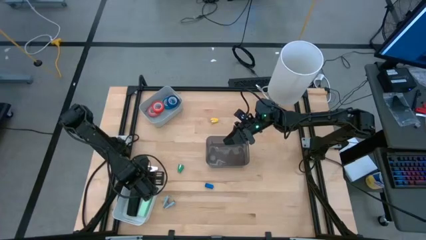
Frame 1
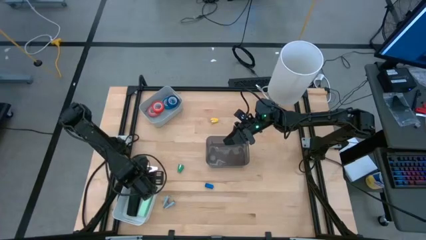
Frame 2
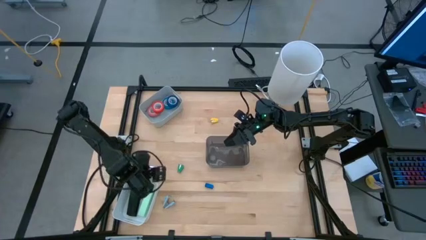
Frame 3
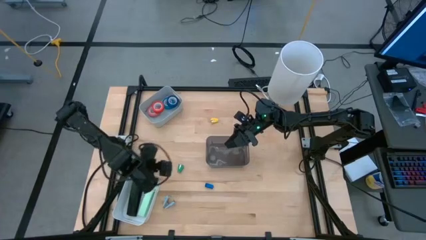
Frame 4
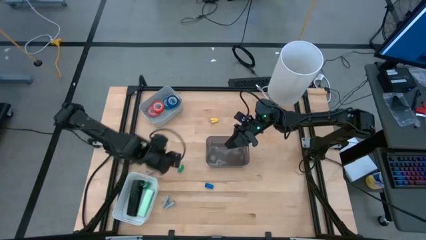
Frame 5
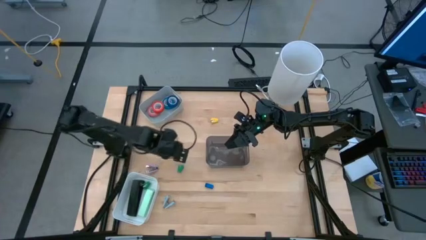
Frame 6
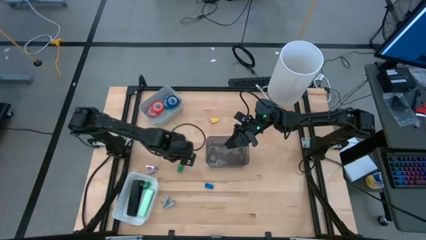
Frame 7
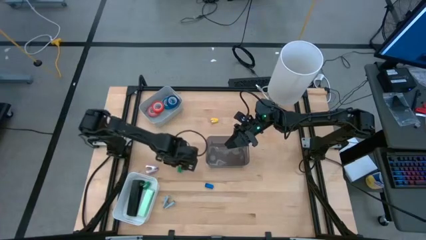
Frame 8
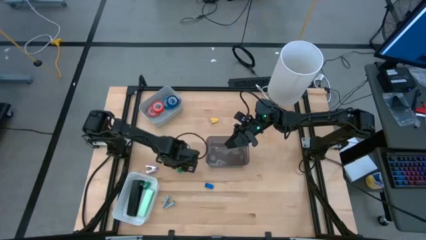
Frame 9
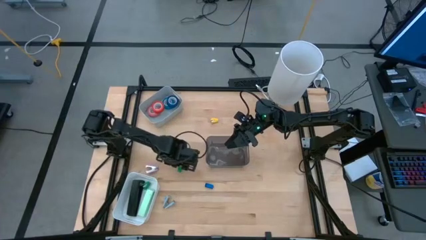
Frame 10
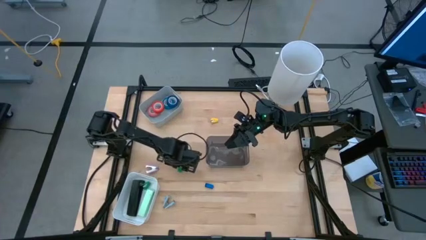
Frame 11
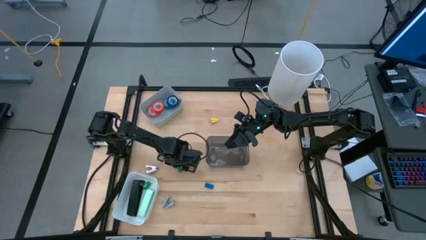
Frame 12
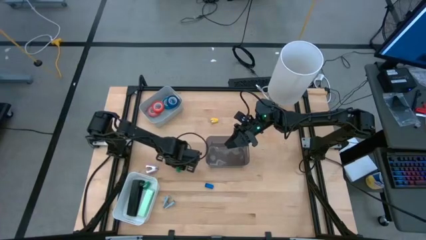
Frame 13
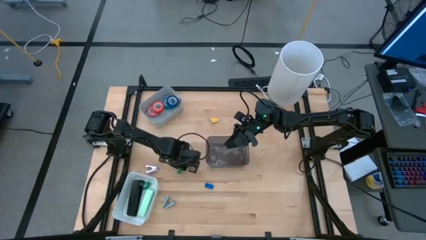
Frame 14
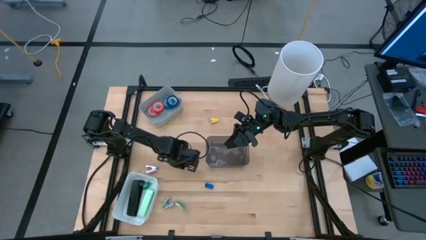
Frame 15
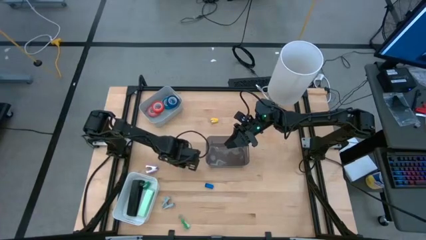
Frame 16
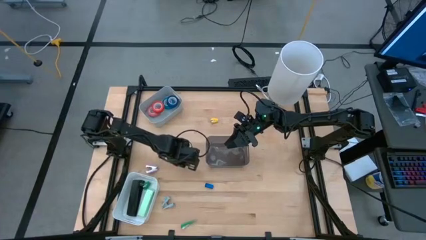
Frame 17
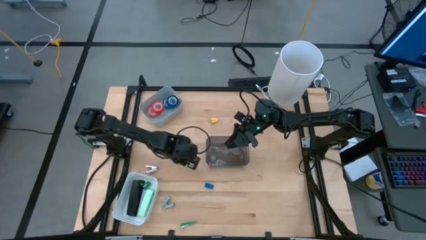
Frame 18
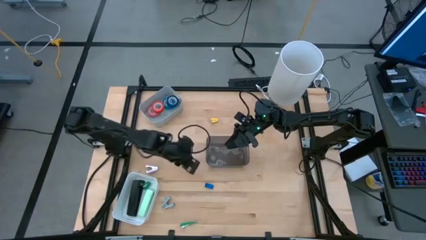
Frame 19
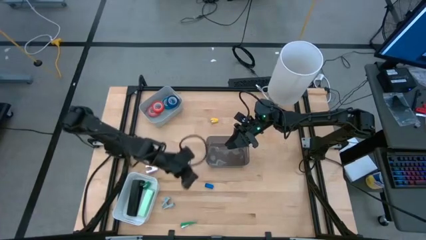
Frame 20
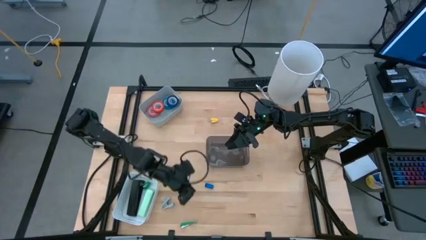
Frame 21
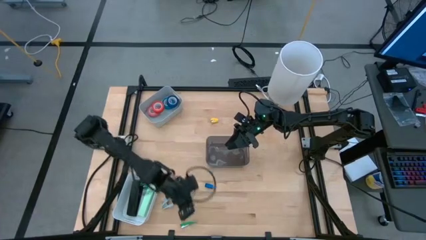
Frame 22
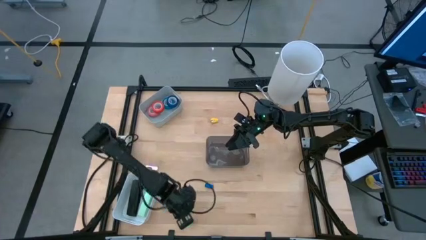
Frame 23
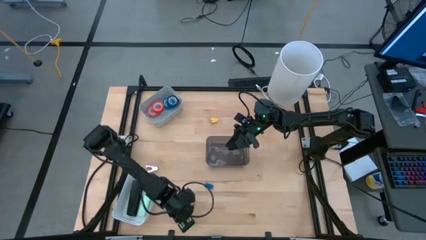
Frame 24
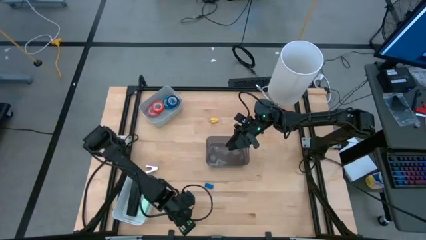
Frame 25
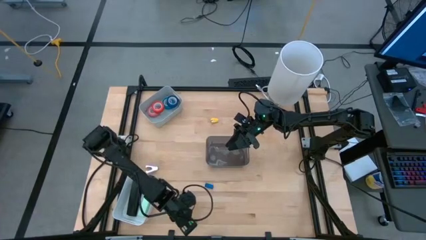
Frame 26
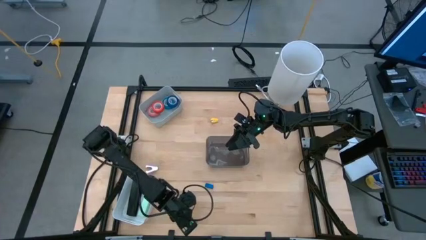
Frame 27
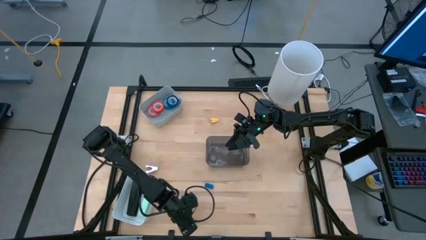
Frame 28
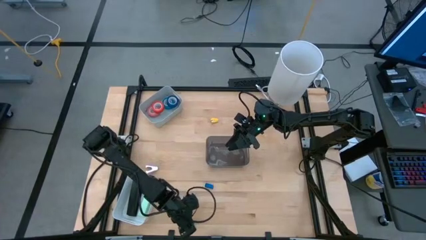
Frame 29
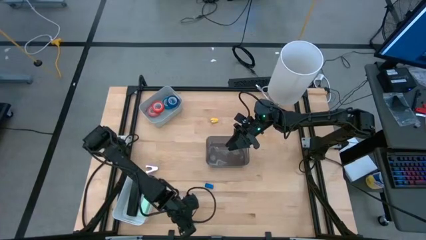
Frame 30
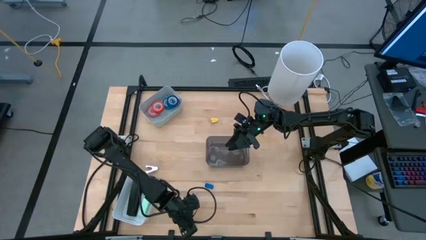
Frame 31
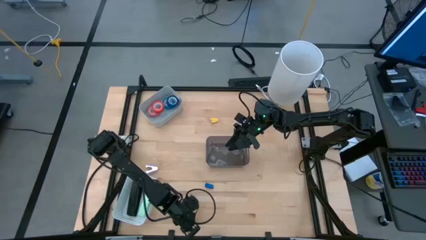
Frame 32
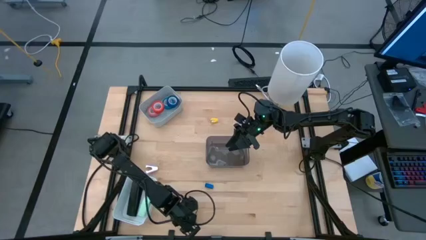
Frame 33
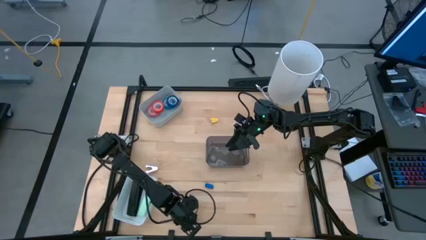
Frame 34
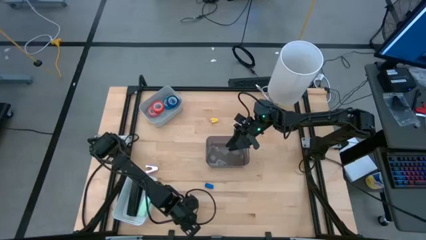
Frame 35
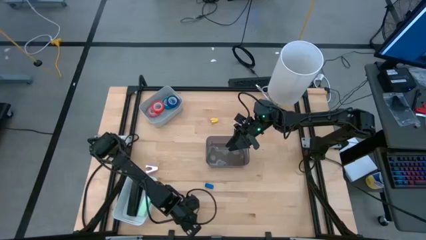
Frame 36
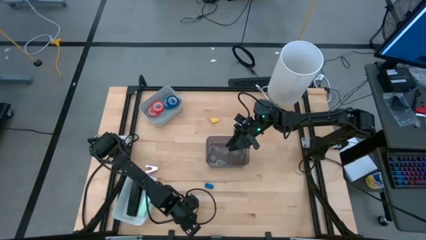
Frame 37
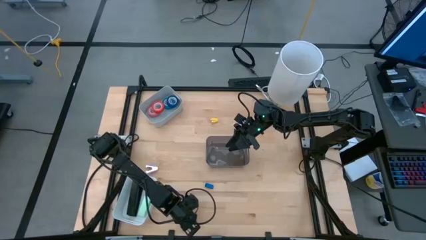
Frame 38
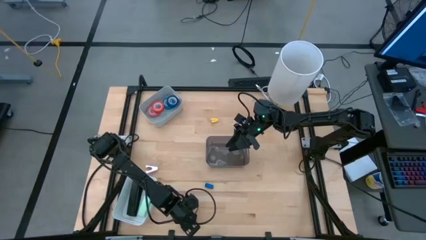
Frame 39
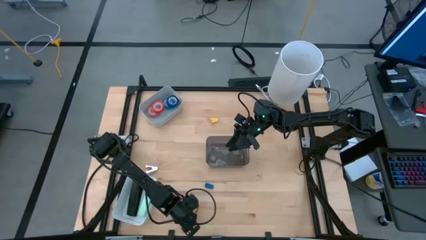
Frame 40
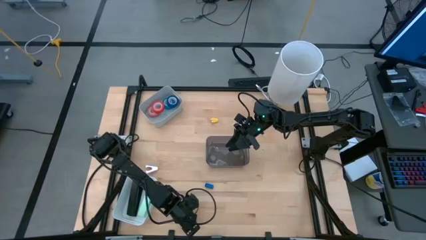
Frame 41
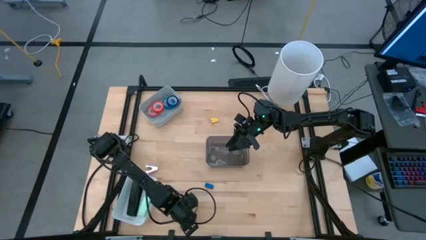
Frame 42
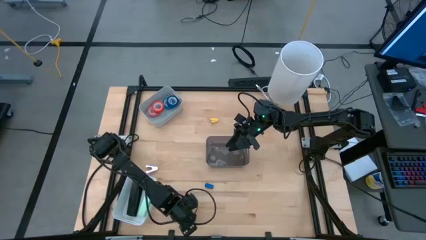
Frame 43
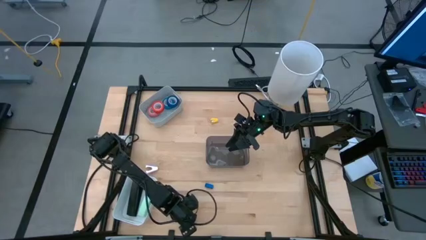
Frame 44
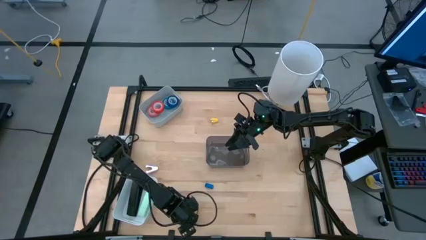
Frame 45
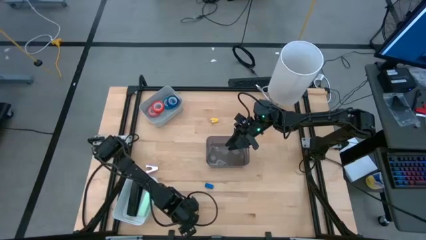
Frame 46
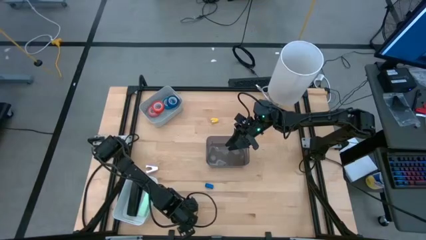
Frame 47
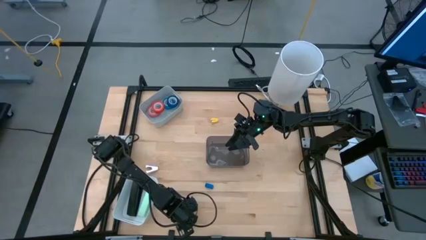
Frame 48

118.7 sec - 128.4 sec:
Task: Pick and place Stapler, Stapler remover, tape
Put the small dark green stapler into the white bin

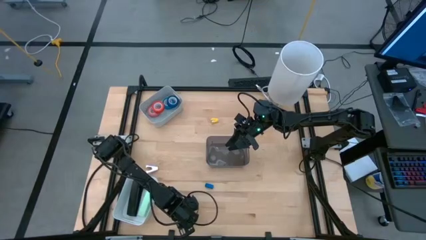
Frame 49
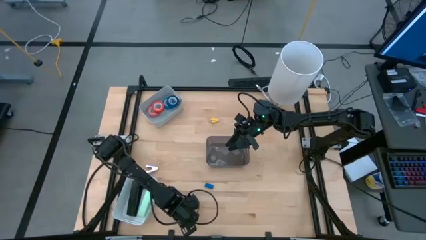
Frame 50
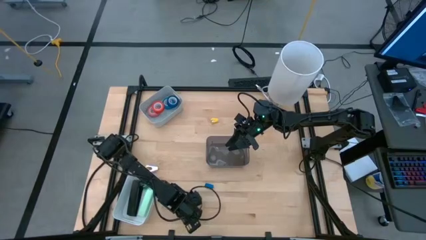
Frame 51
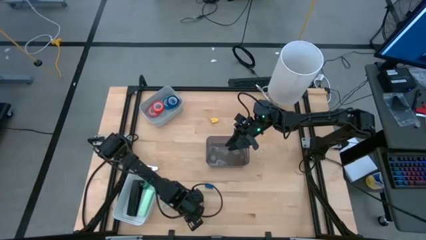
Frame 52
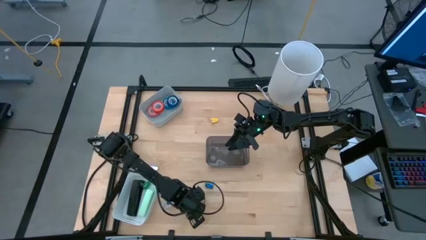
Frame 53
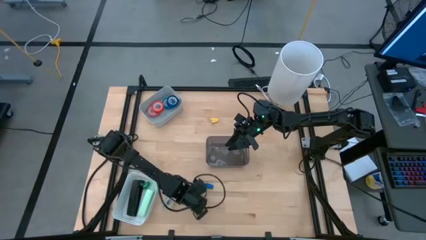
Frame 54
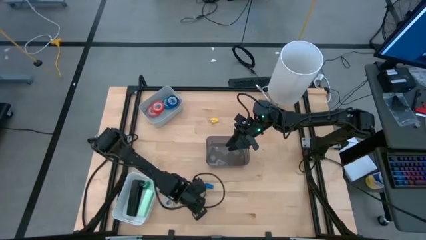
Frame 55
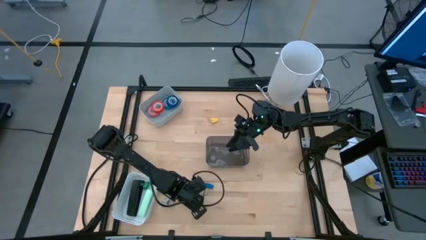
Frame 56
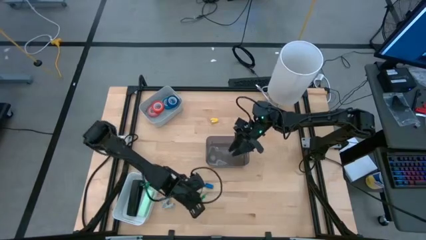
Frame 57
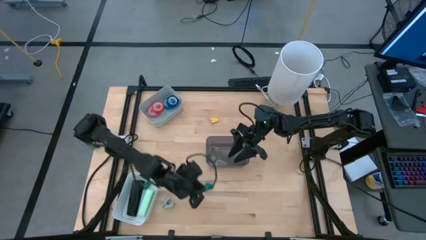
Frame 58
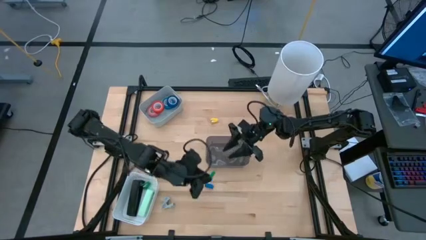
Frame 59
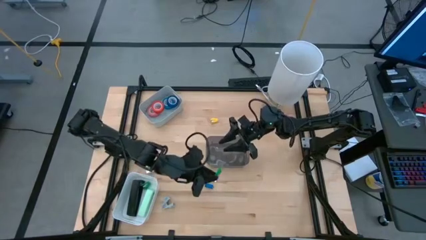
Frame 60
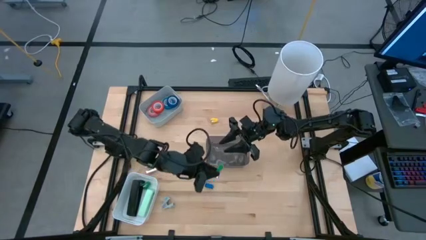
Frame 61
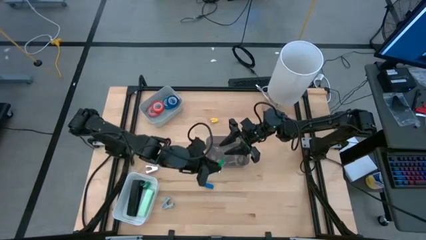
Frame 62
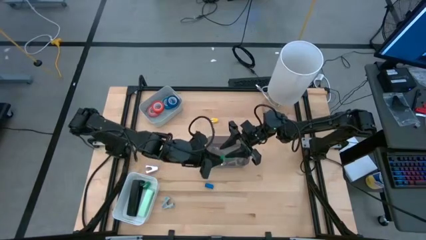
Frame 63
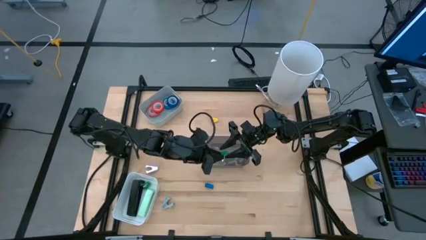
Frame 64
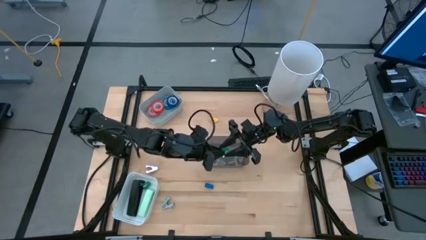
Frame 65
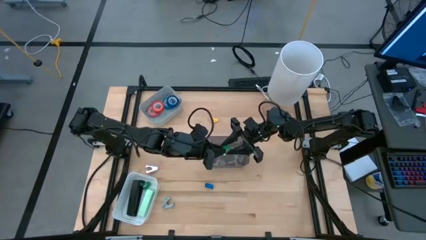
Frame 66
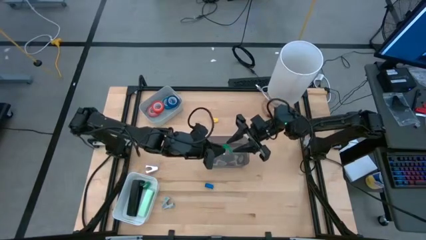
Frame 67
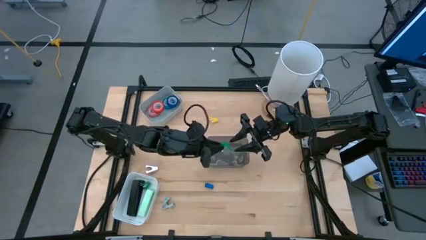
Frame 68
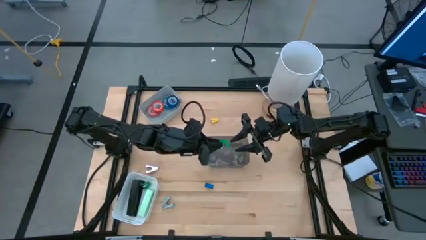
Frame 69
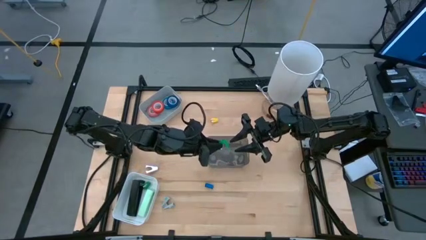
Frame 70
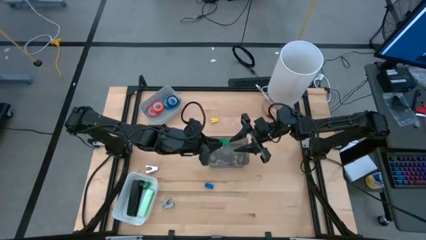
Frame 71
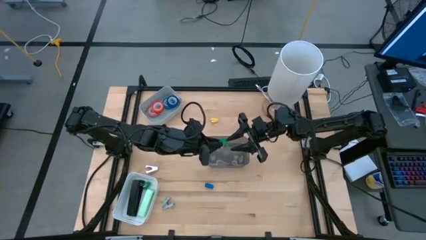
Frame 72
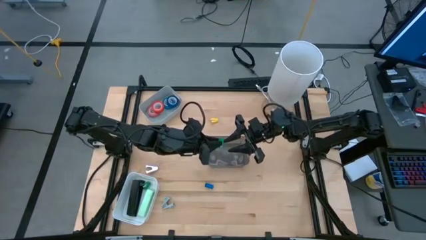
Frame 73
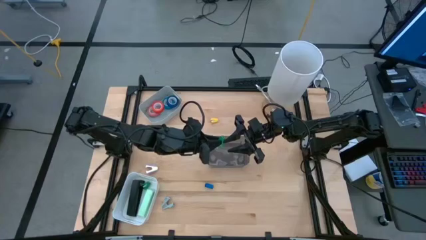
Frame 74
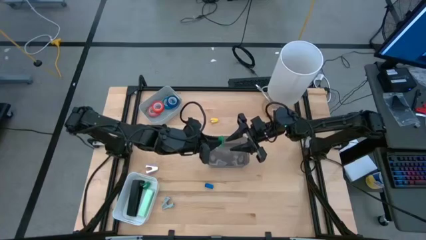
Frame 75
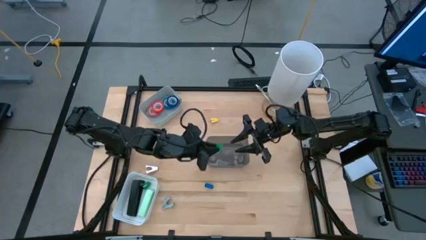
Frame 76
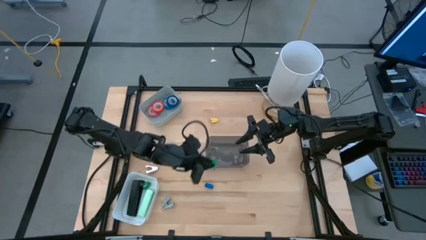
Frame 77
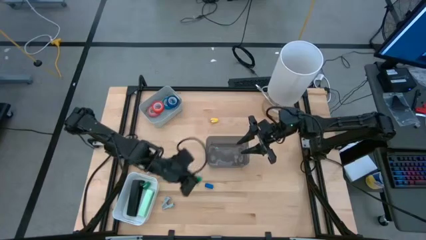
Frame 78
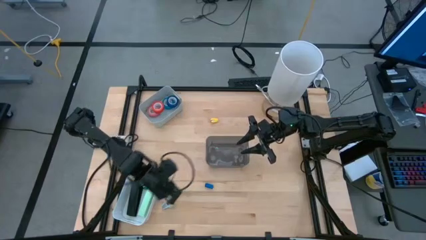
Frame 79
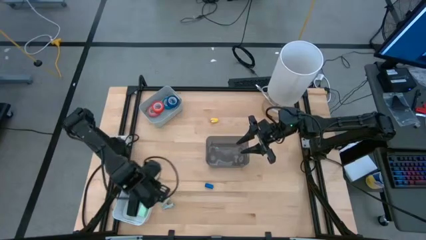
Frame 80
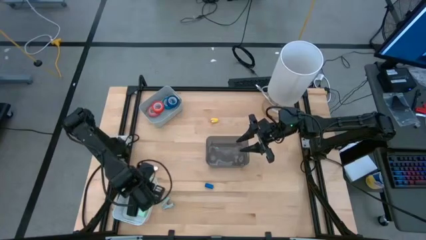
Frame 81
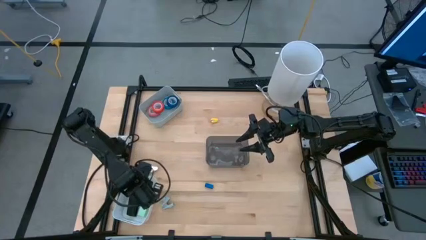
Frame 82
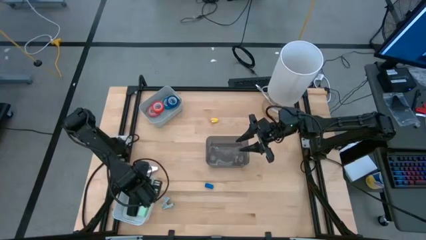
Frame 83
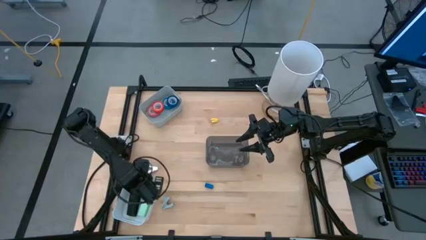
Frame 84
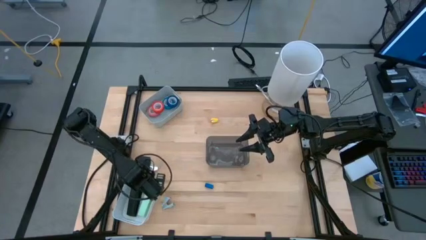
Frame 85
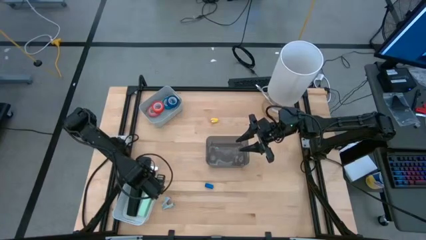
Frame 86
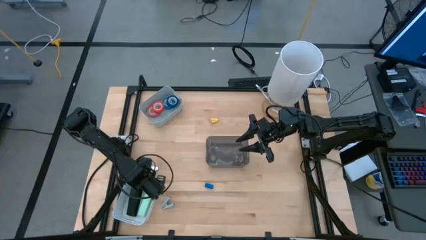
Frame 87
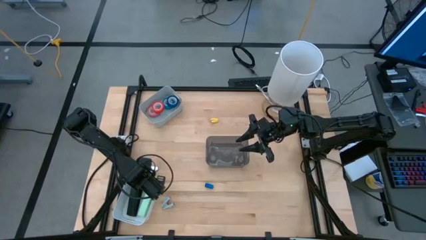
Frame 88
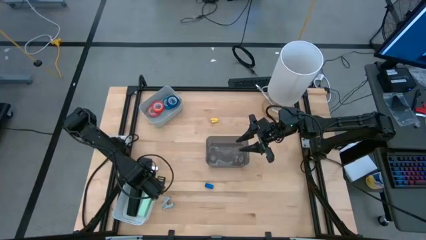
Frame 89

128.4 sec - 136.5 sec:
Put the small dark green stapler into the white bin
